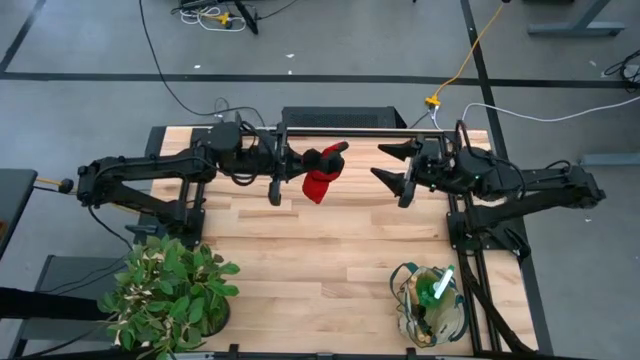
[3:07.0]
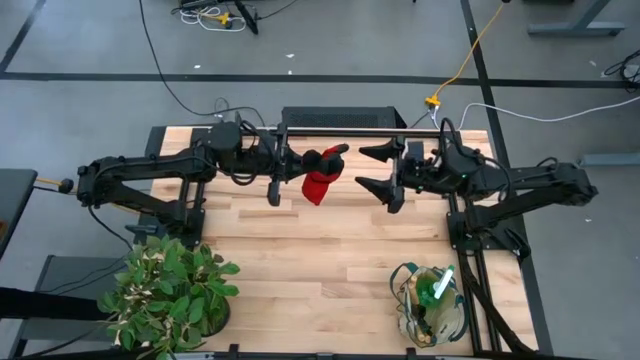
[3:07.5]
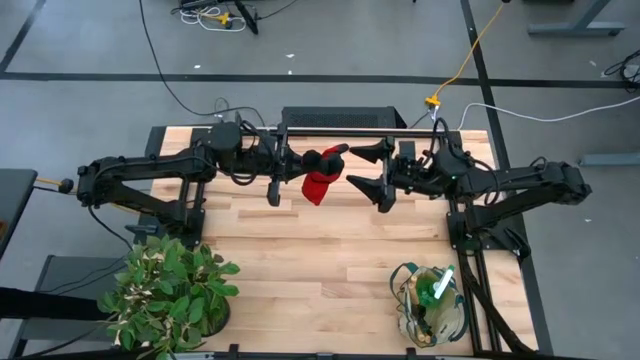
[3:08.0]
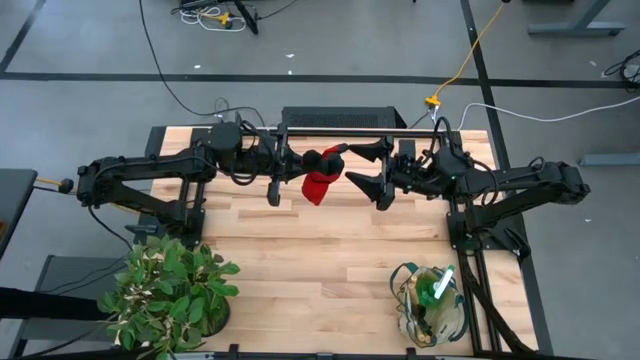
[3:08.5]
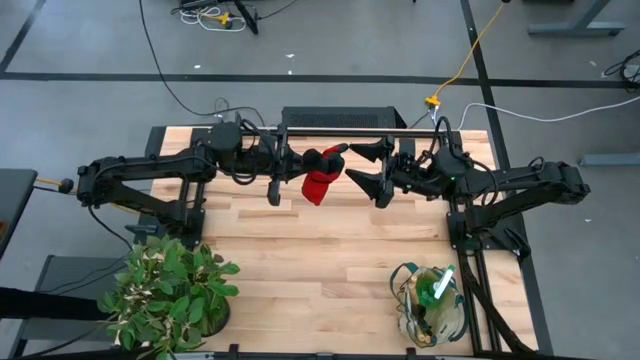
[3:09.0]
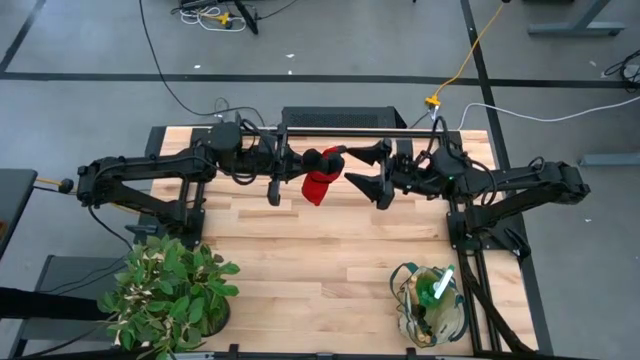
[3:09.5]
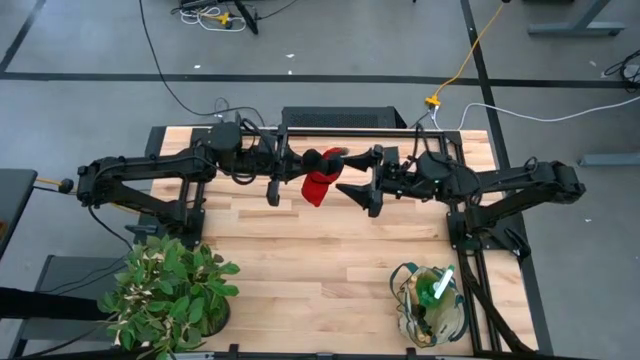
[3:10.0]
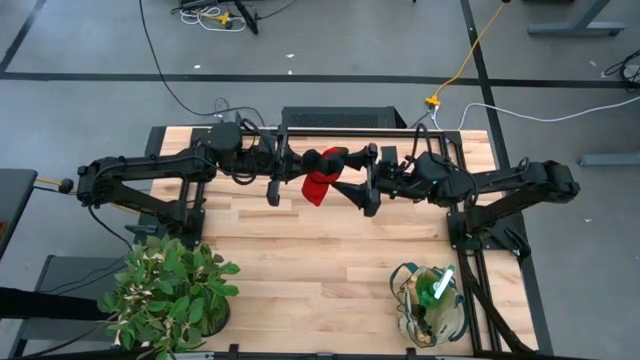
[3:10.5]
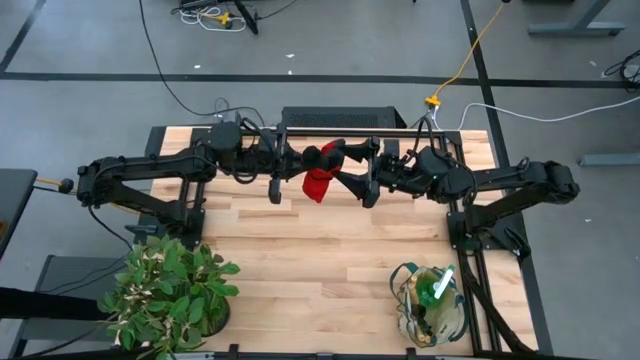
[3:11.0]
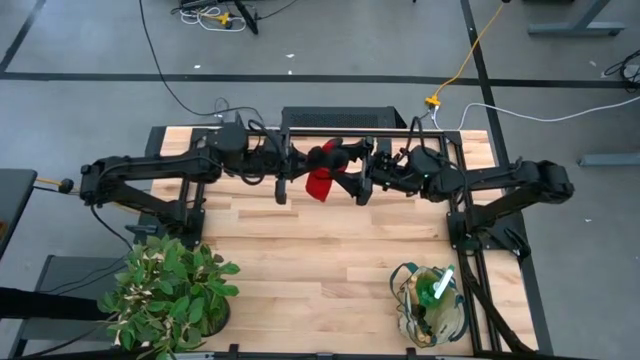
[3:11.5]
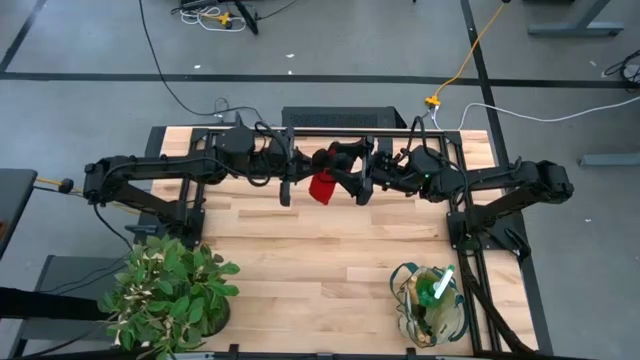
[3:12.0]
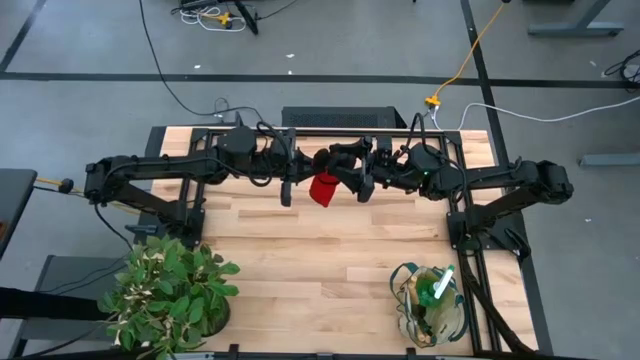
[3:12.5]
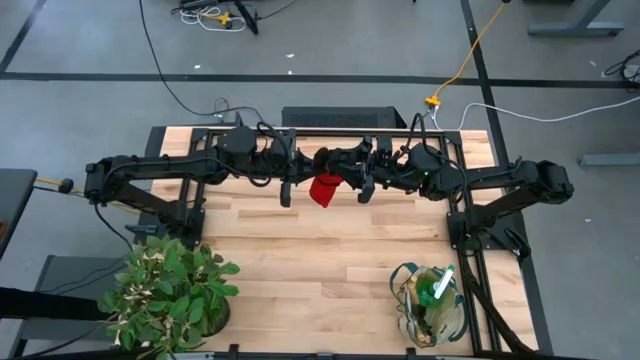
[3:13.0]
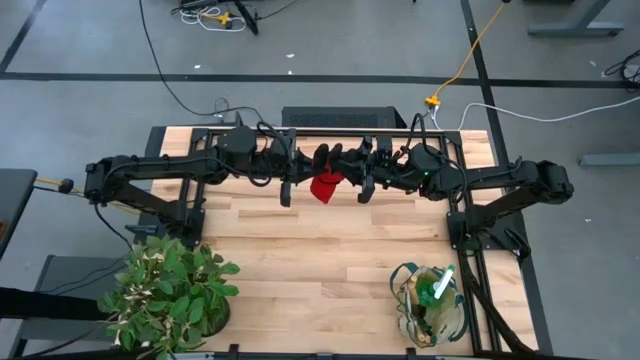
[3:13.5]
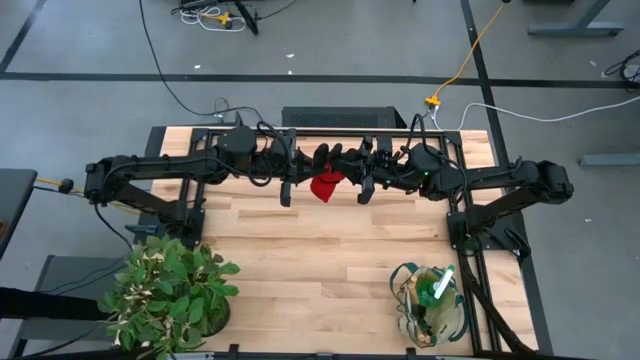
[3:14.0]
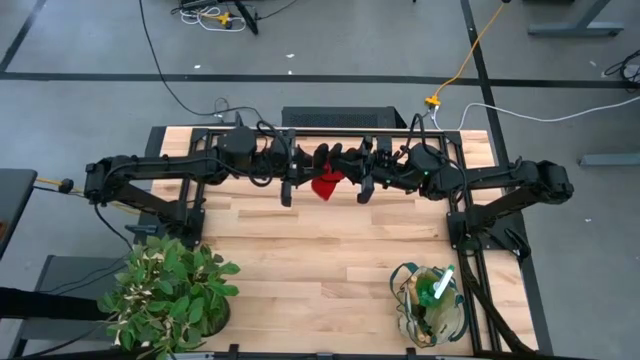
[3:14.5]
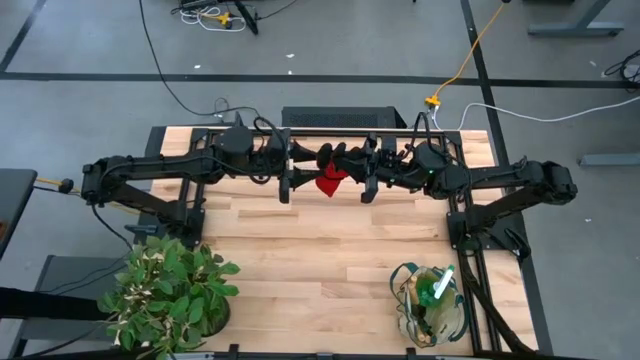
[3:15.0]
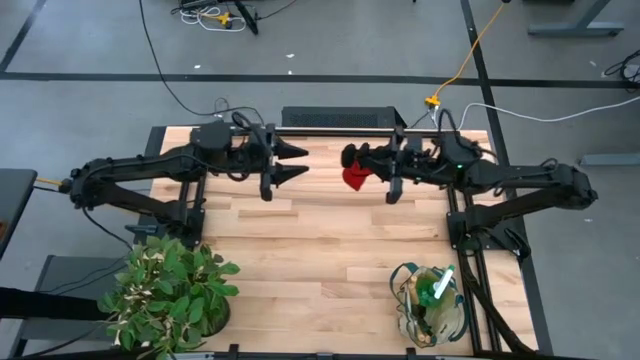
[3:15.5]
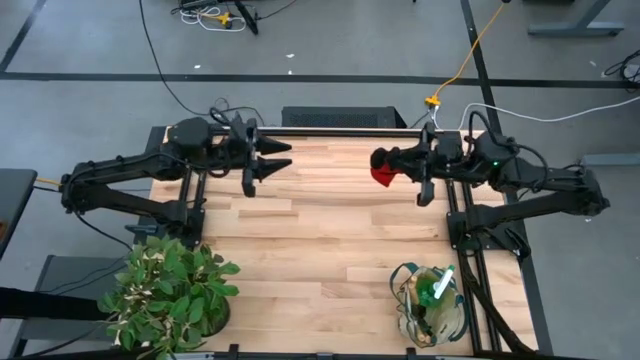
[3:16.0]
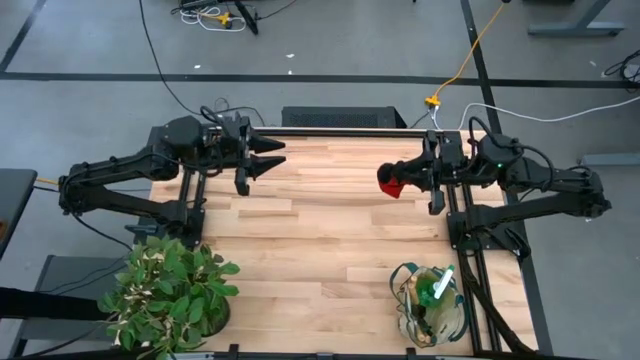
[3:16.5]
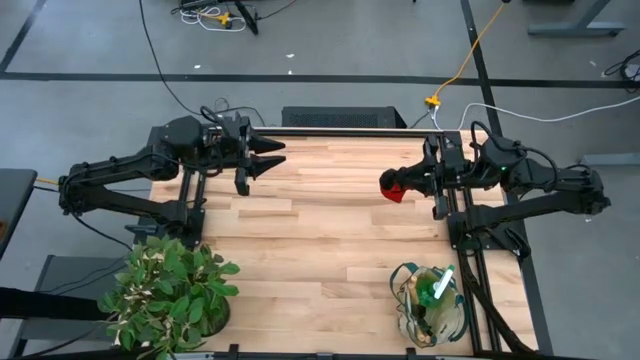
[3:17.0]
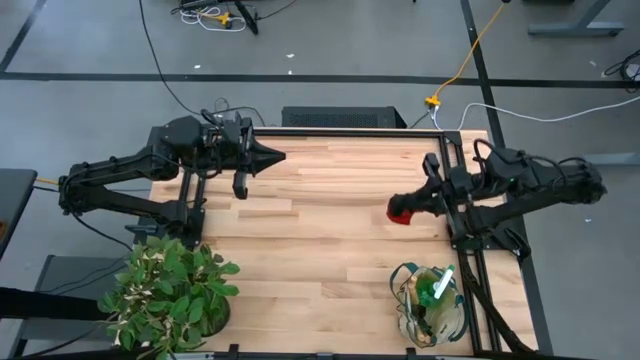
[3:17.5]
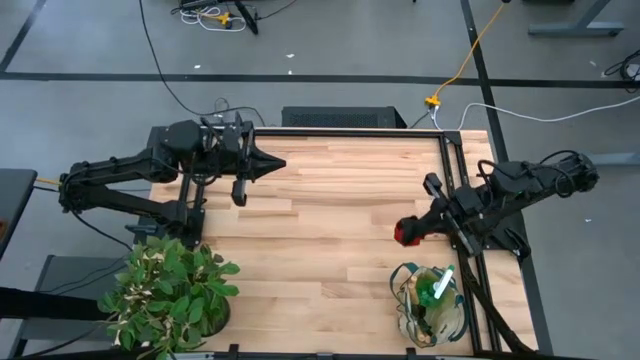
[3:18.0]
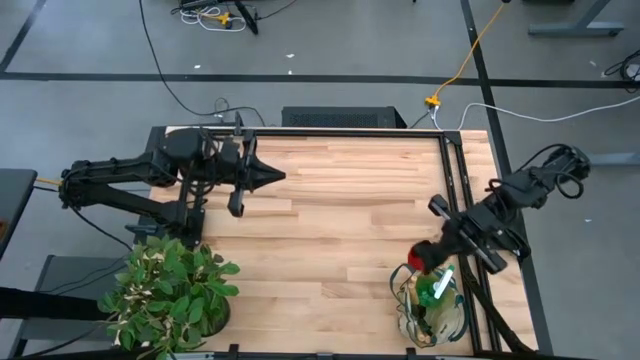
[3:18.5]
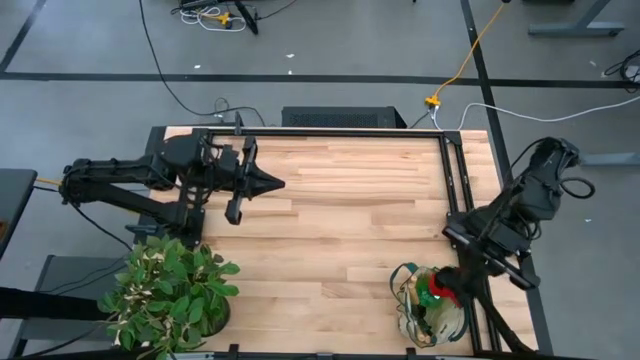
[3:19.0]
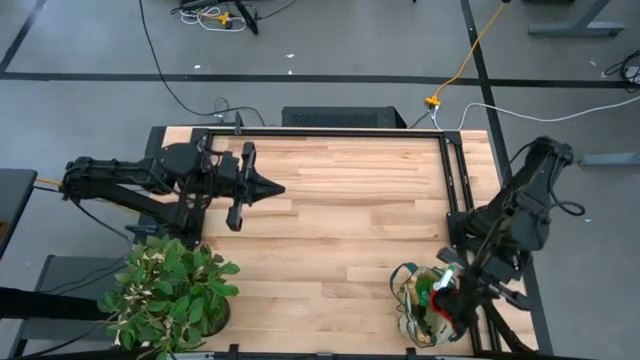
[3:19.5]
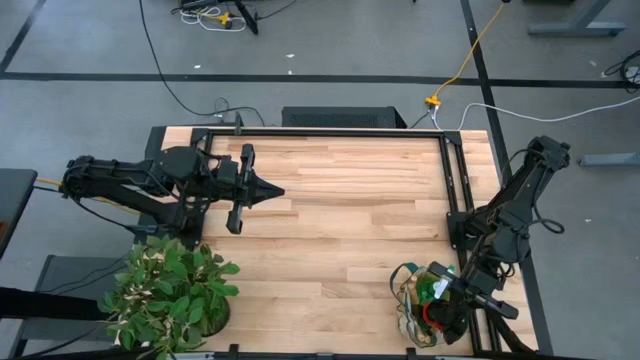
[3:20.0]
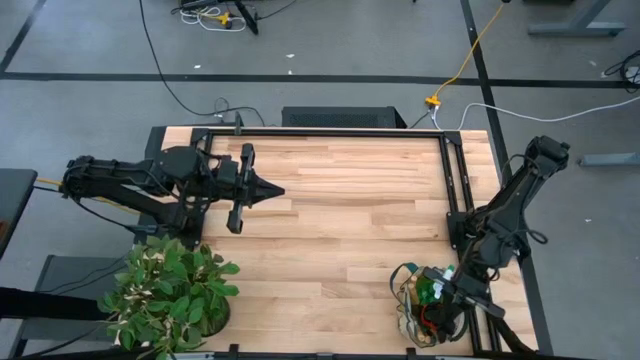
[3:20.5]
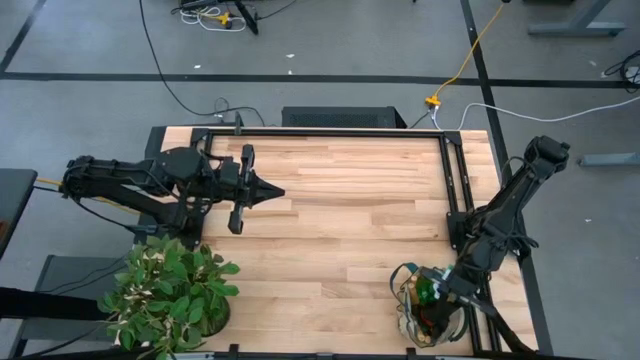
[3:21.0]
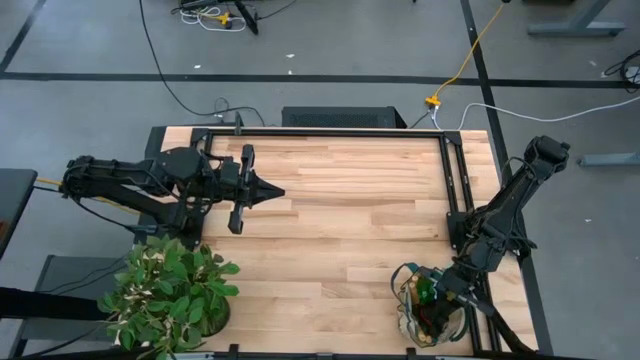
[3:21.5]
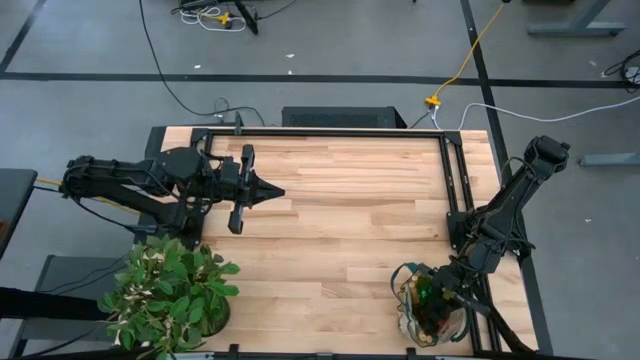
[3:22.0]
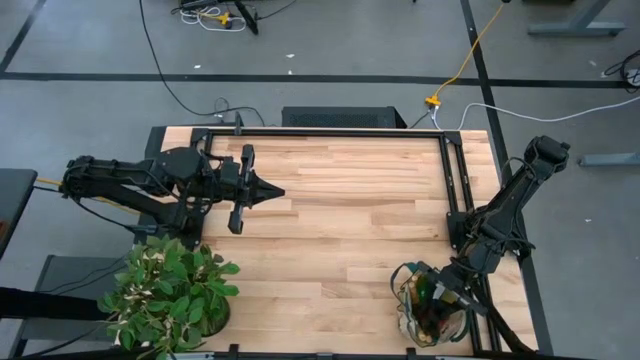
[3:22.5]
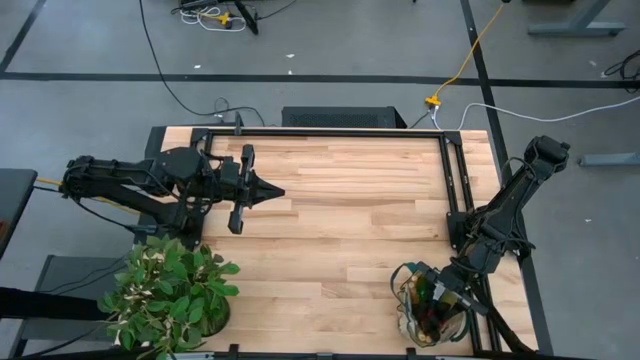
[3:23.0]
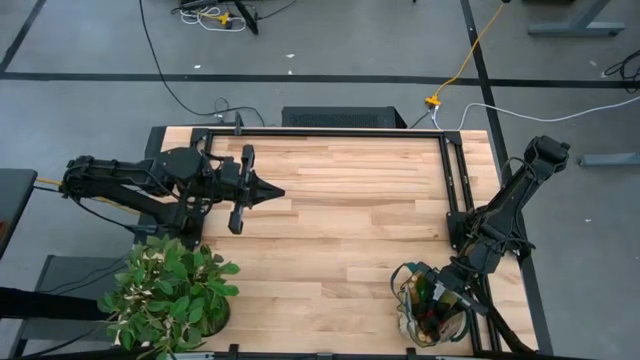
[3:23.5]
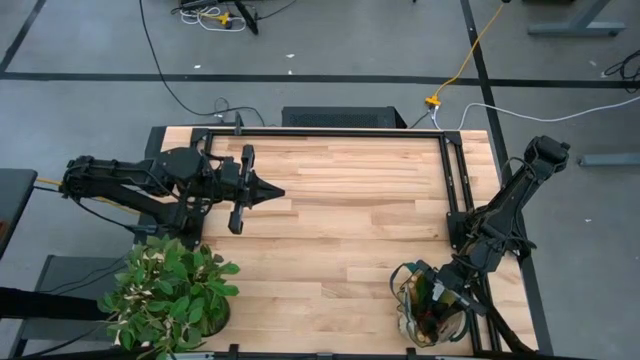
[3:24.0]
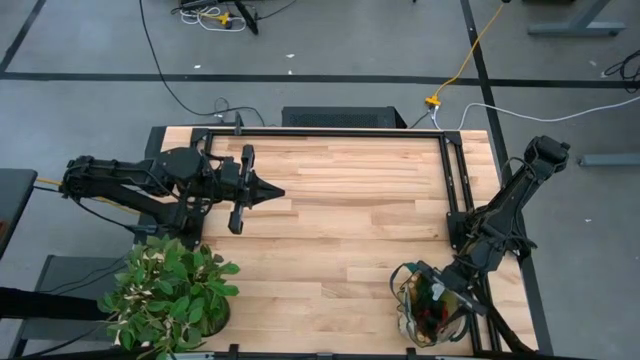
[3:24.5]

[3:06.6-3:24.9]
Task: Pick & Place Garden tools in Gardening bag
Put the red gloves into the white gardening bag

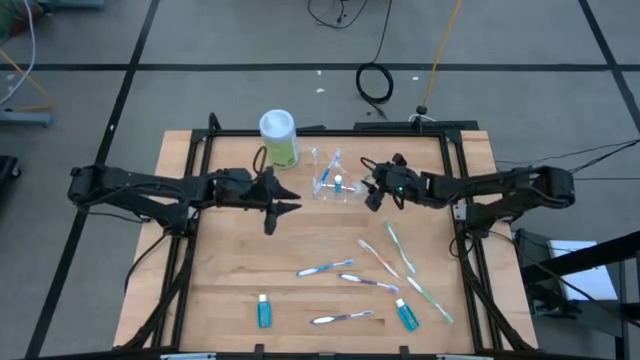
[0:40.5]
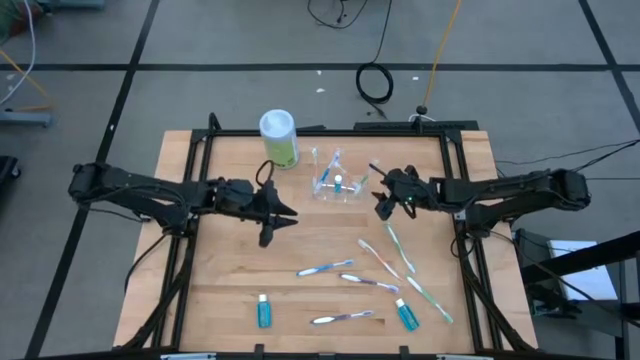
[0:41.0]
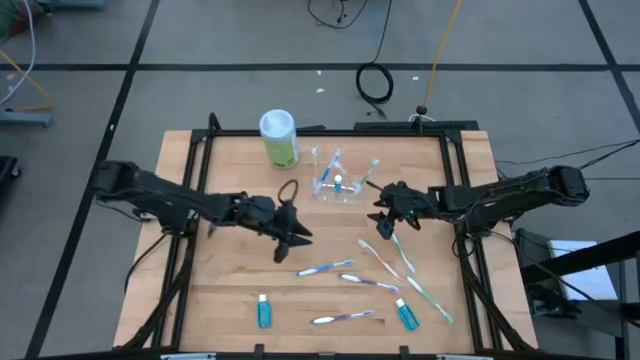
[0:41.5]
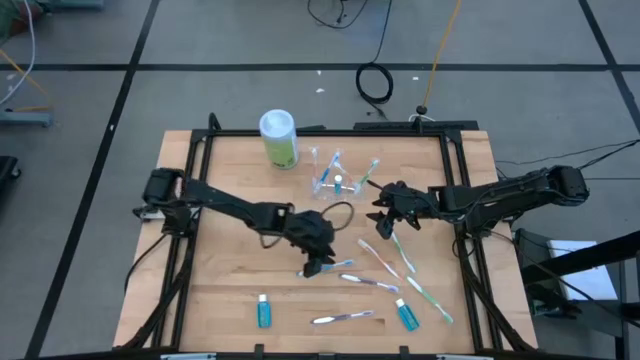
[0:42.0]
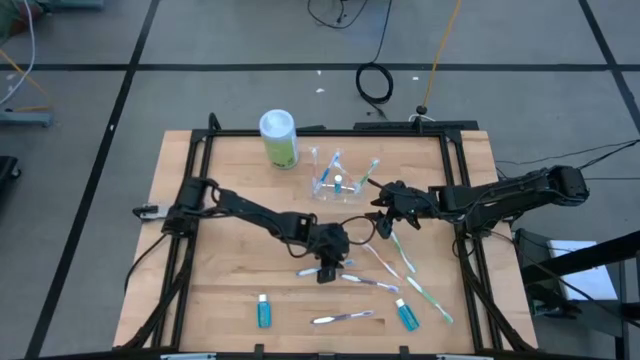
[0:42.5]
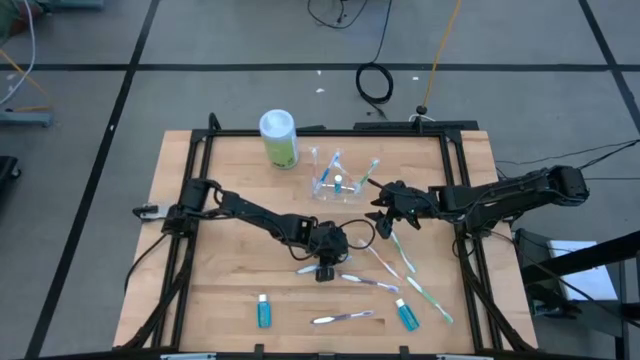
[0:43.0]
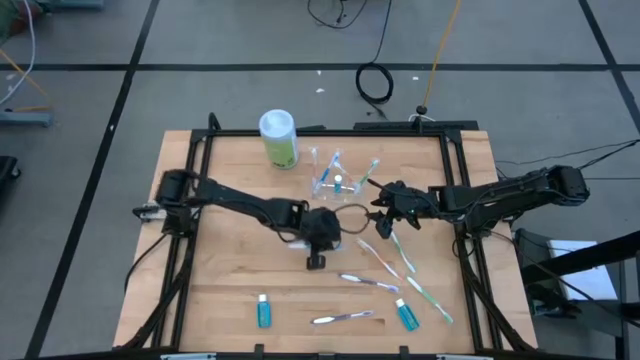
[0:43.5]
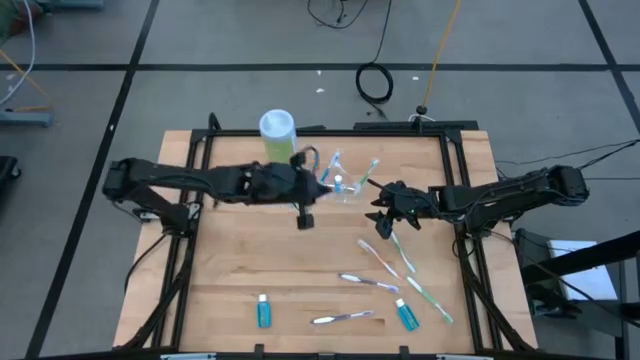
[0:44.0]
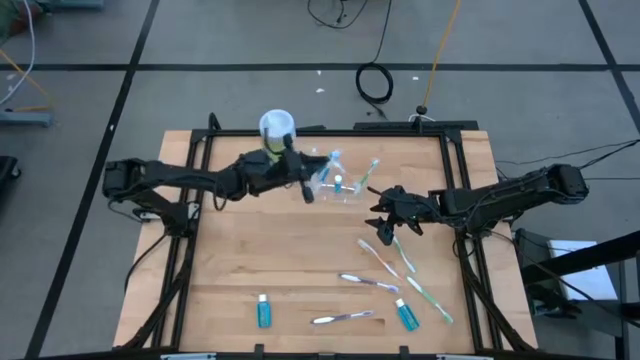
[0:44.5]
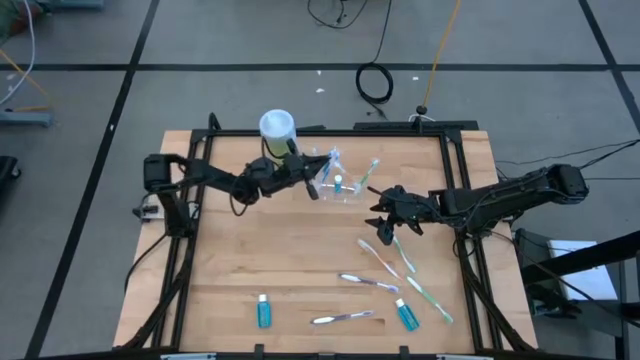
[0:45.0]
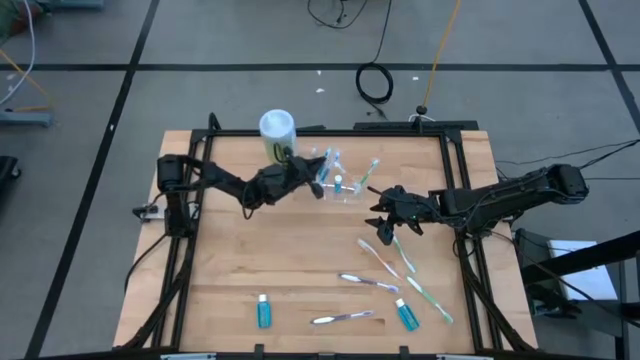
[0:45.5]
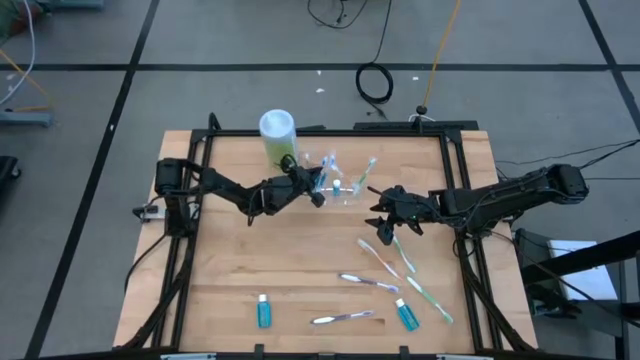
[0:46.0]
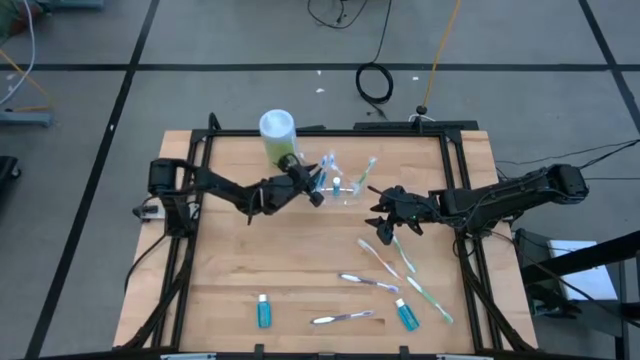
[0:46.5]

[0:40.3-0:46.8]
Task: Pick & Place toothbrushing station
Put the blue toothbrush into the transparent organizer
